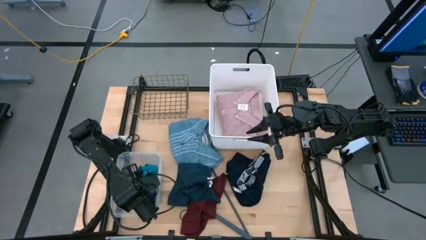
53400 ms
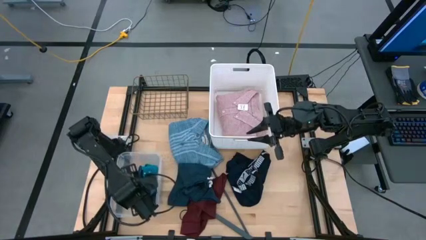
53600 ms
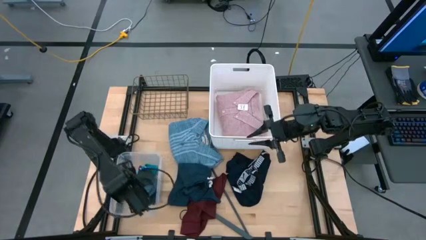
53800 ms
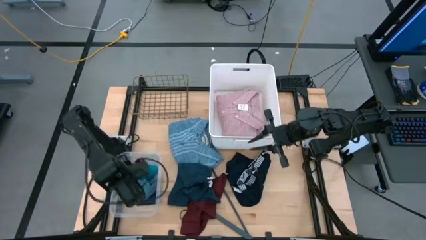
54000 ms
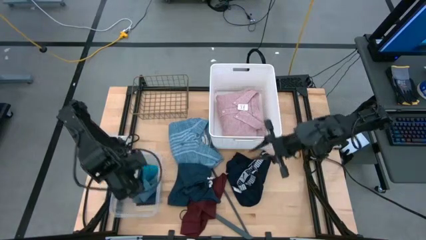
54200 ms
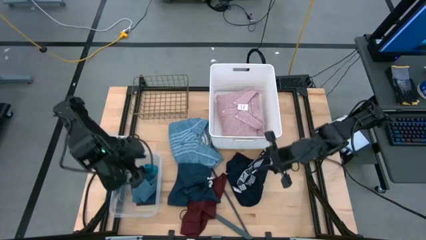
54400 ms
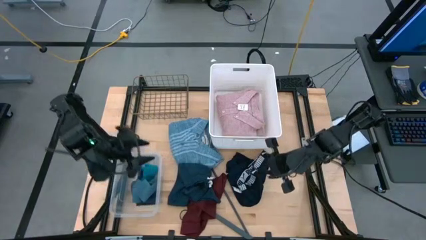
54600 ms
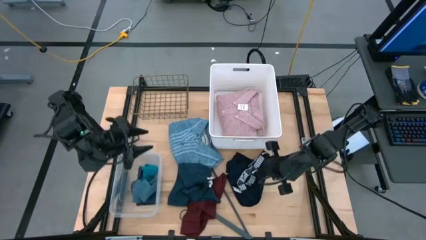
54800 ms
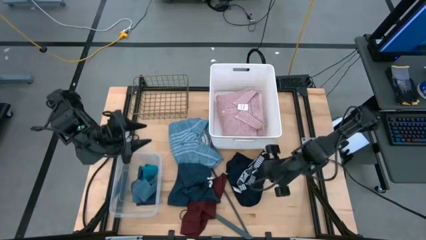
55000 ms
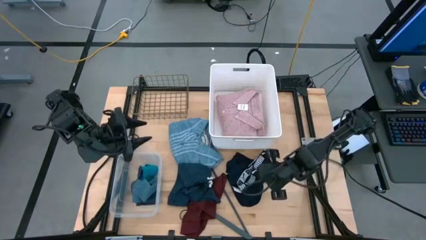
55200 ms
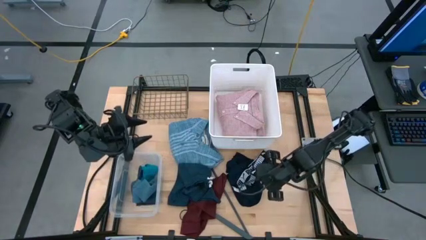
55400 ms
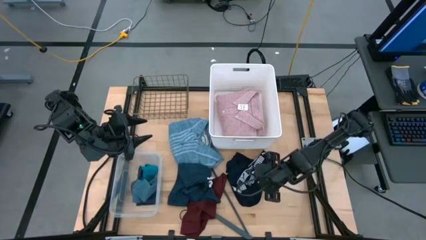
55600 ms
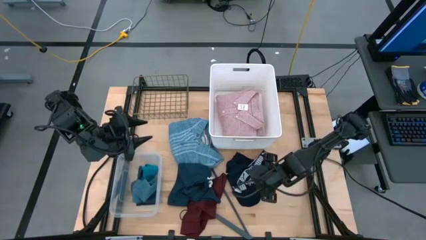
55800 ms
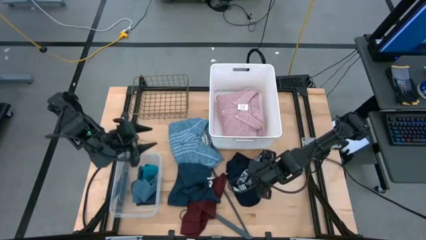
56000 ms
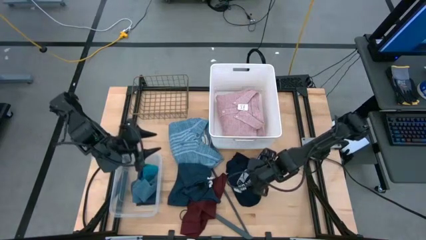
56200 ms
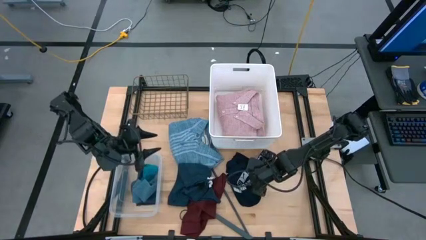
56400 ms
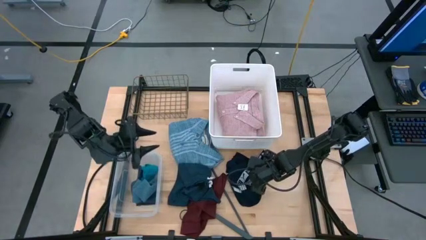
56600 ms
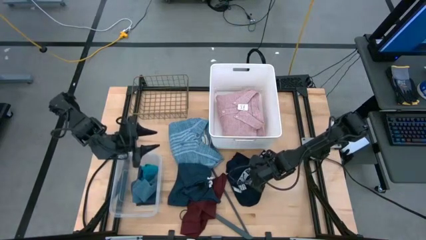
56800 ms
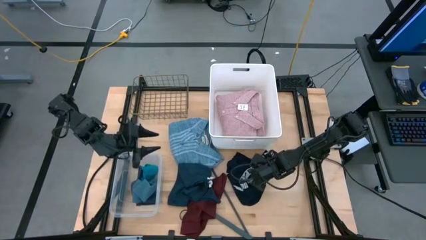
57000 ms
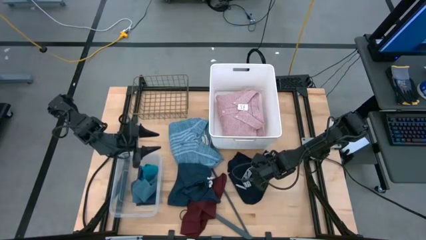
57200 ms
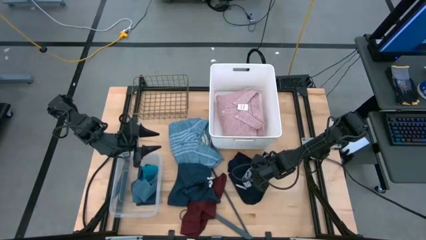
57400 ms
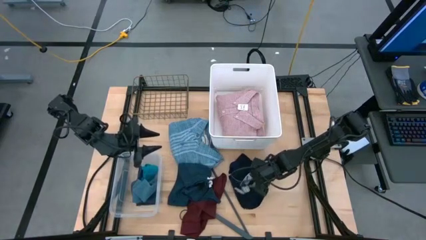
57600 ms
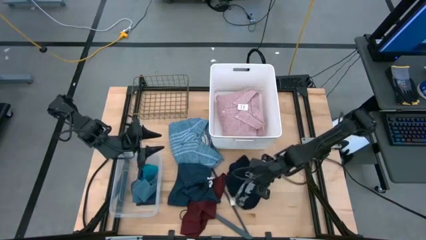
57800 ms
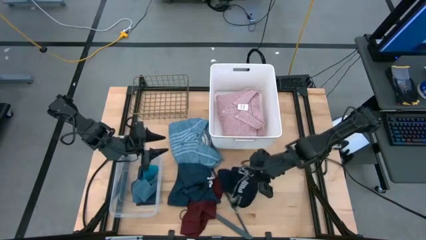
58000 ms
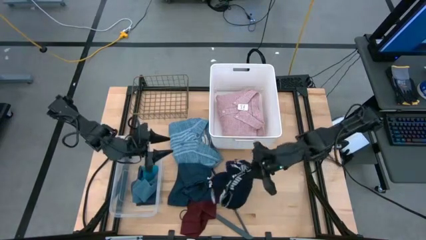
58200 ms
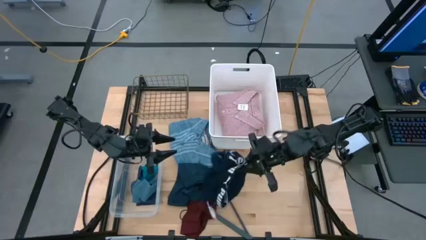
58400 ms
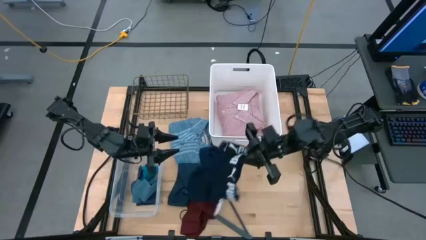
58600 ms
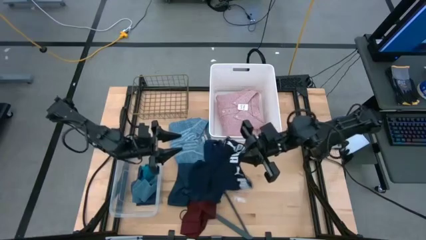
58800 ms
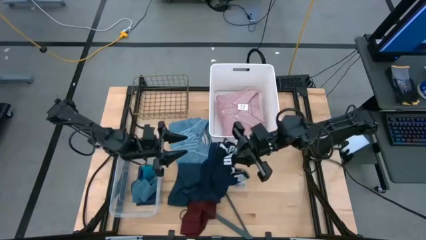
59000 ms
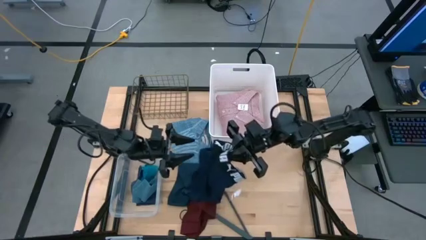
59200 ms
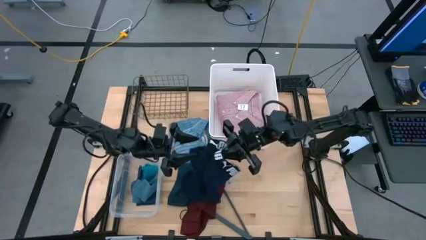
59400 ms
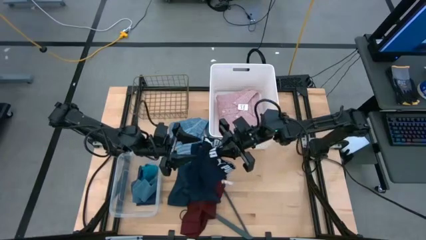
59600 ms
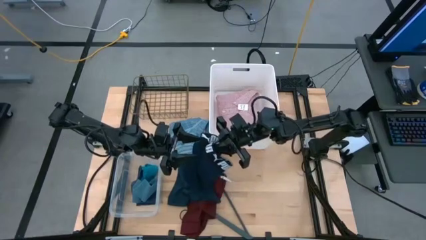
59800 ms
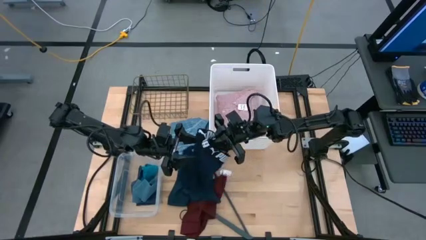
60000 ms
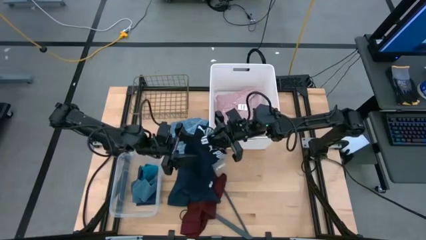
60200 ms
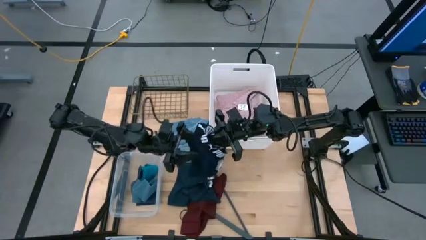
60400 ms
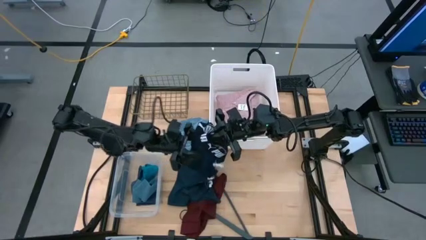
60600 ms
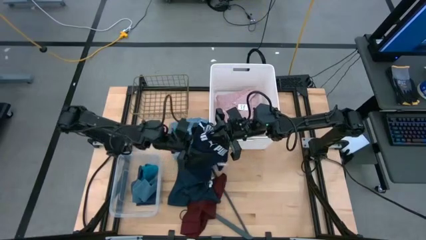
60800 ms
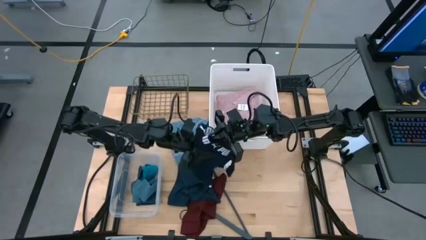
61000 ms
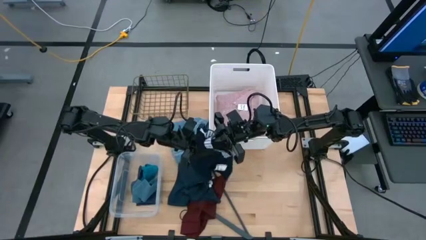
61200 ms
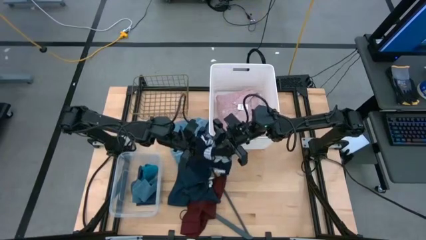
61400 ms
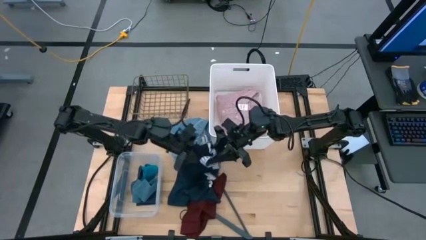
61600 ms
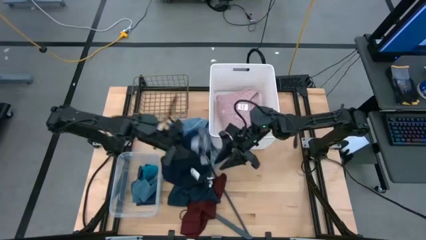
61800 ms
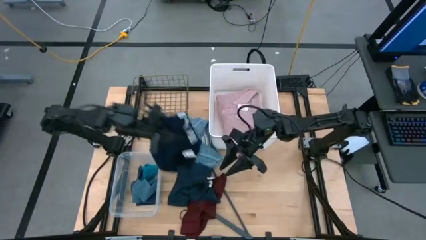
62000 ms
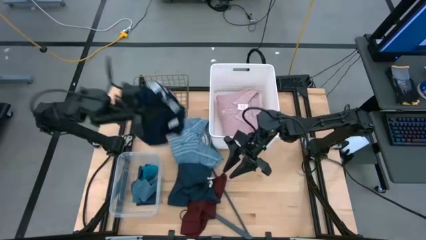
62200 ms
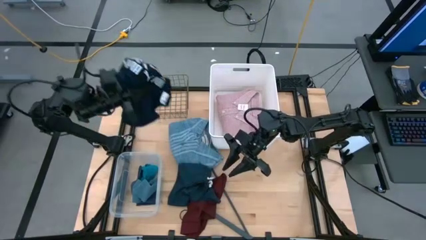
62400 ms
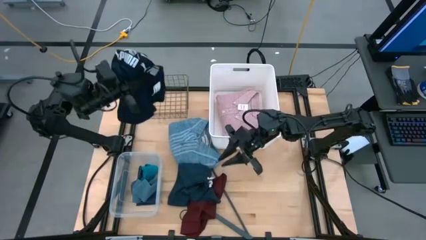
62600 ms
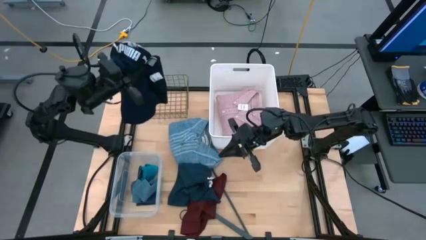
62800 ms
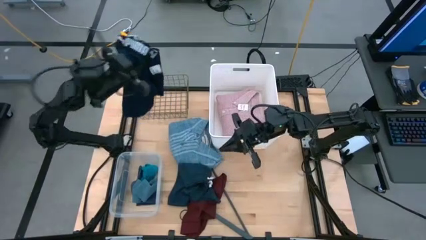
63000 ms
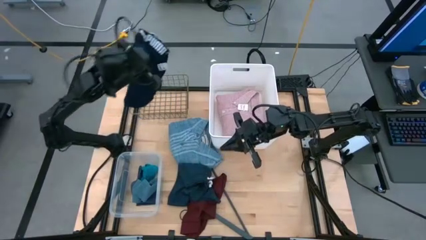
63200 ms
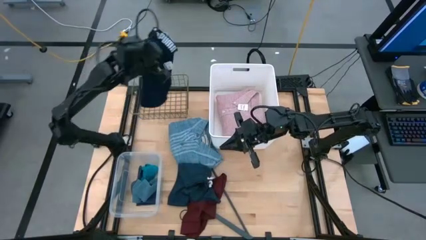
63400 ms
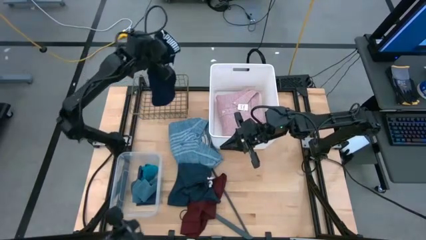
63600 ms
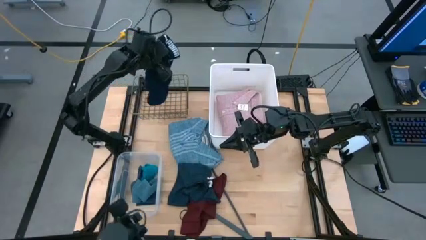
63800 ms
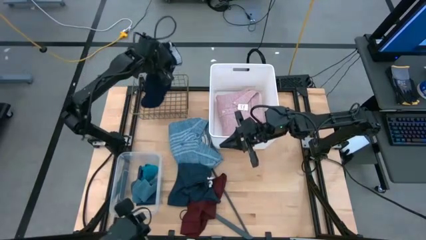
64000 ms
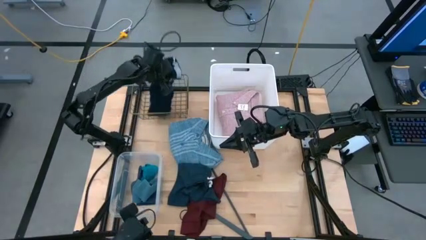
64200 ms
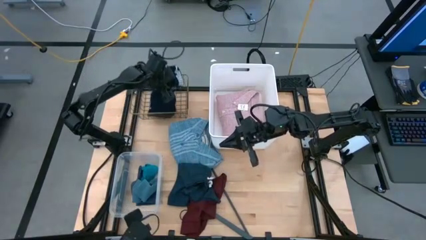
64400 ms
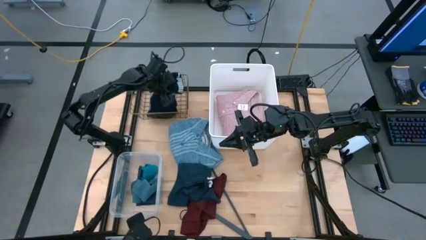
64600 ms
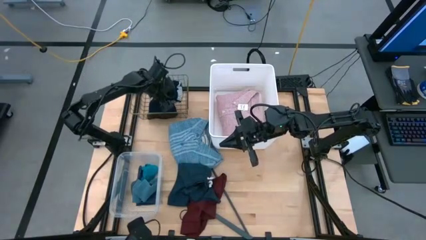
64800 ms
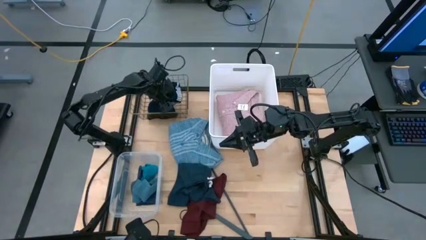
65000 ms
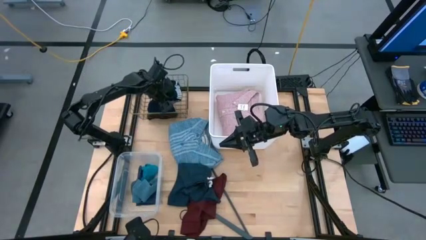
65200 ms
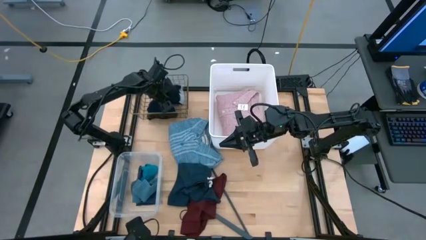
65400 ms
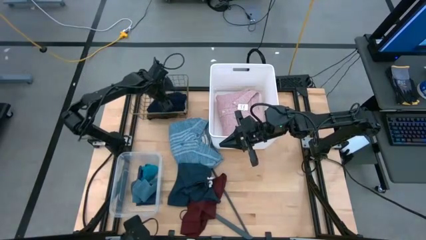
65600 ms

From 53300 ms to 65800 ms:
Task: Pick & Place Cloths
Put the black and white underwear into the brown basket

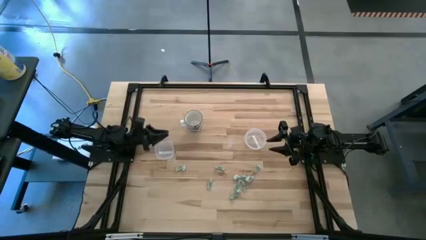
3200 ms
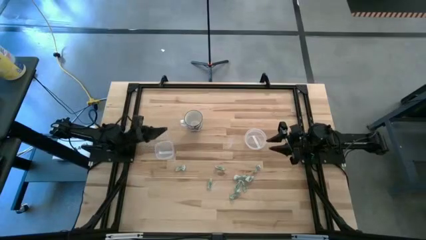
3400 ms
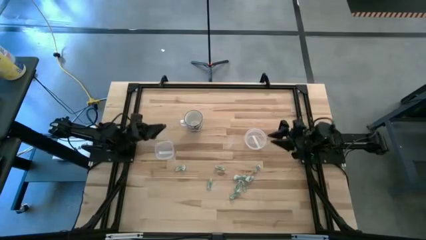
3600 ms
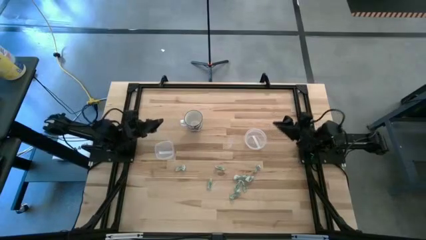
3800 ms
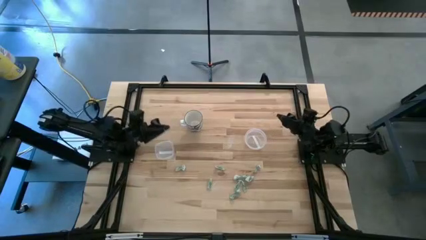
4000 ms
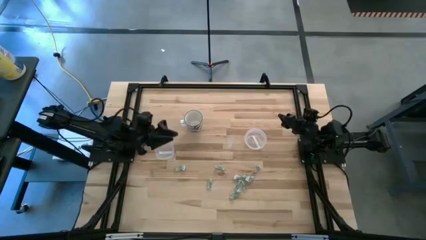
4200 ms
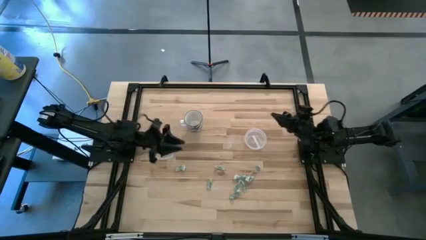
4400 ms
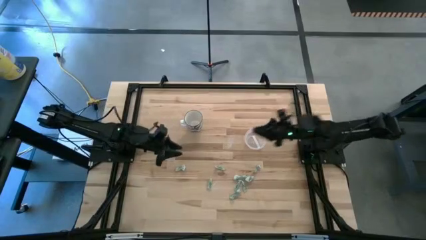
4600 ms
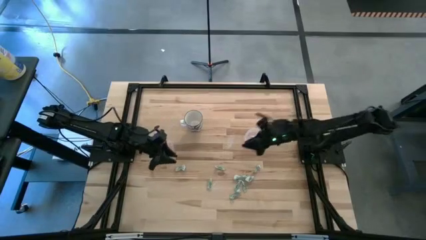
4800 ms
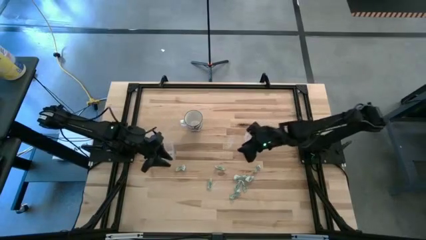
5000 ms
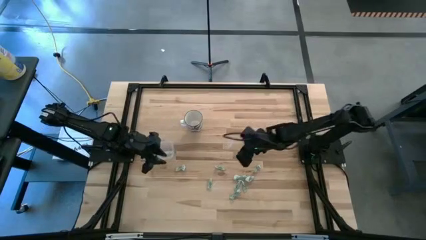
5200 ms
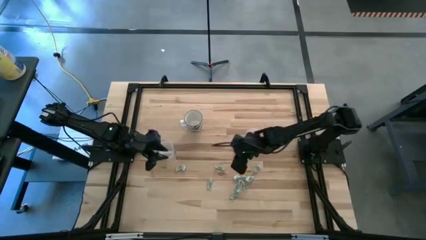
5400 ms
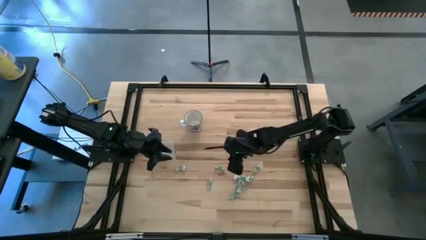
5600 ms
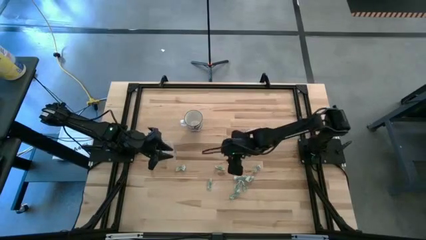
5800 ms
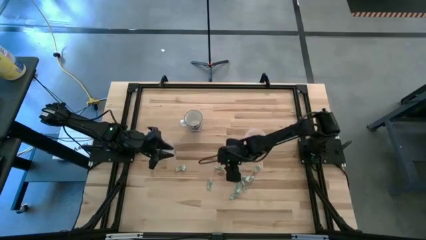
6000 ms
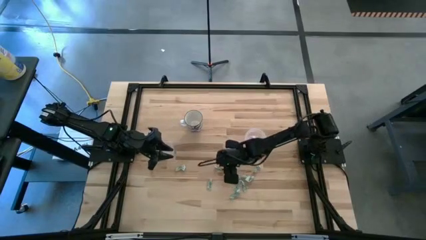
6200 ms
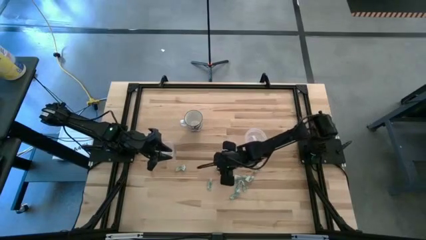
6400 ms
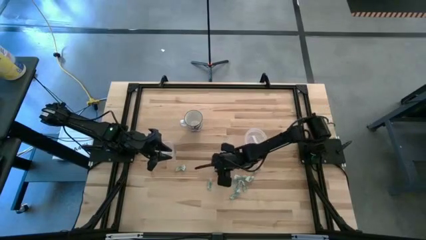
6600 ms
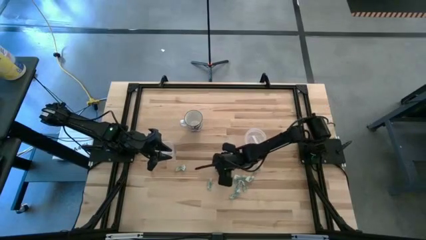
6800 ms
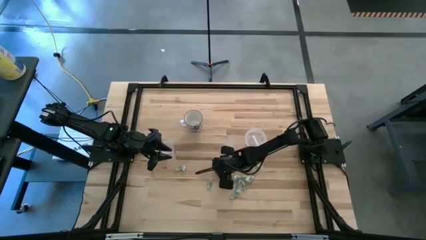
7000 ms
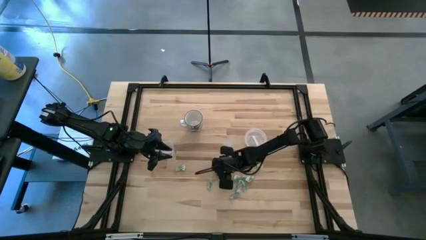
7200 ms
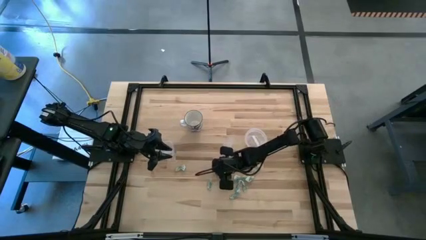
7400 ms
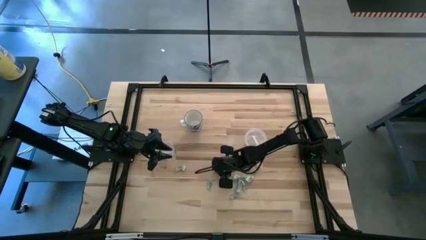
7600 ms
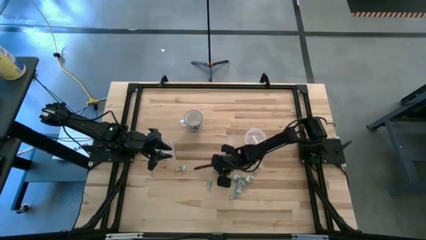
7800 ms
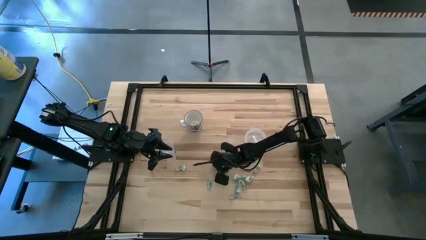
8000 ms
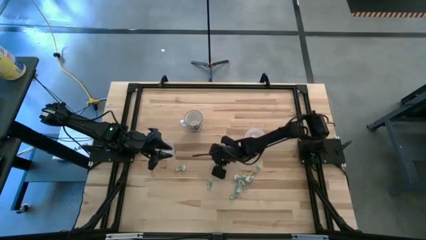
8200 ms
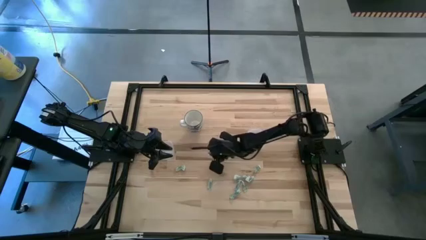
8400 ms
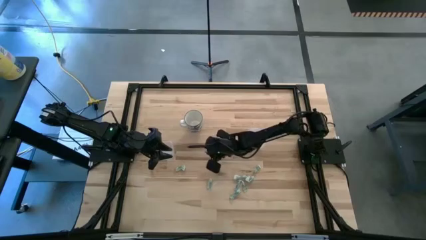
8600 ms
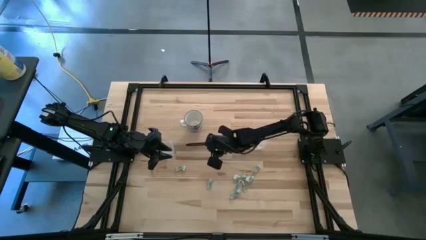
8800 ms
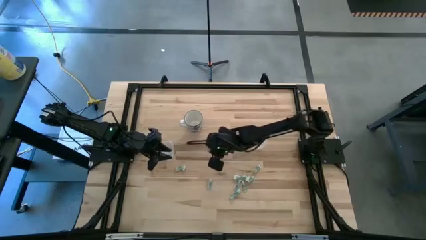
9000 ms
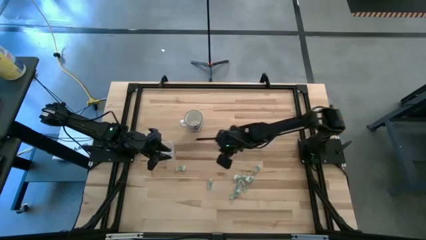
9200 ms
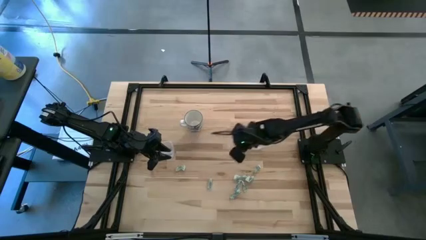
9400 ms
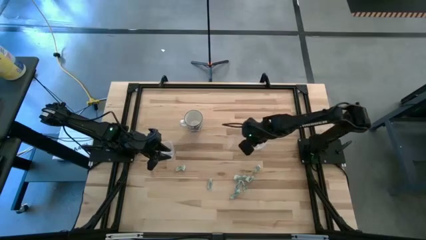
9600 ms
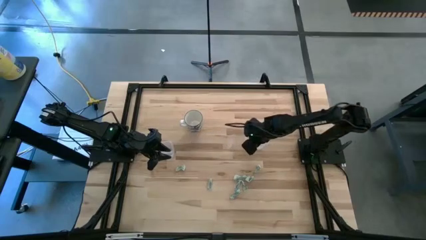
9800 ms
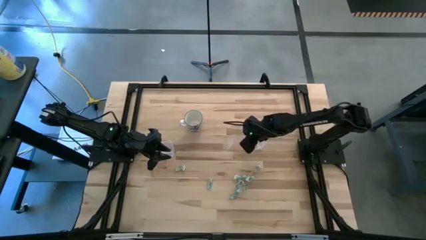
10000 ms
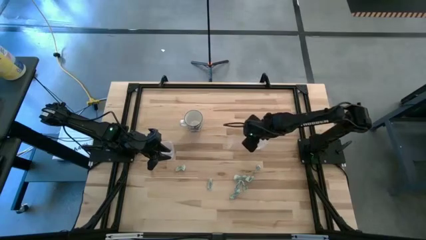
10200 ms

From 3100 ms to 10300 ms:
Task: Pick and place Stevia / Truvia into bins
Put the green stevia packet into the right transparent container
